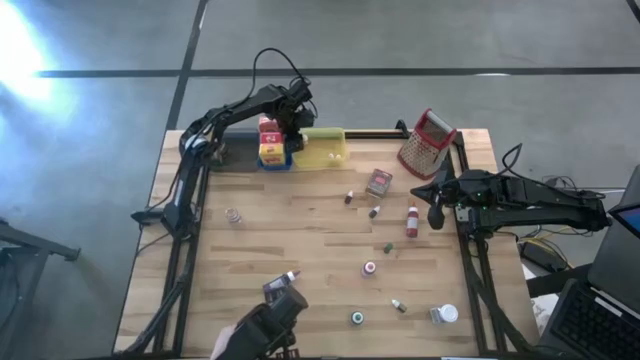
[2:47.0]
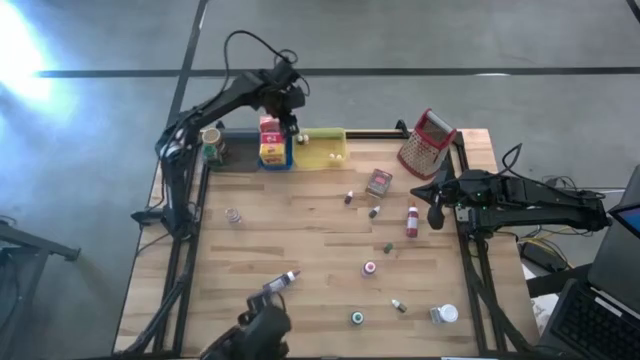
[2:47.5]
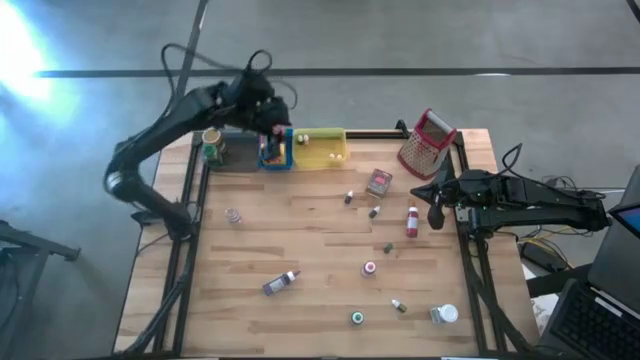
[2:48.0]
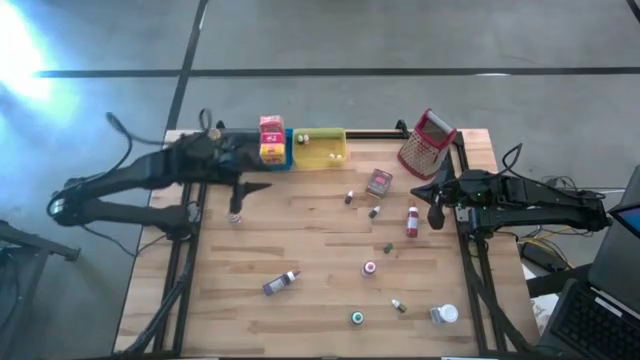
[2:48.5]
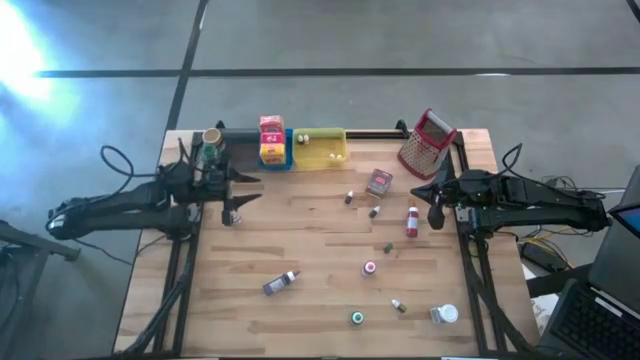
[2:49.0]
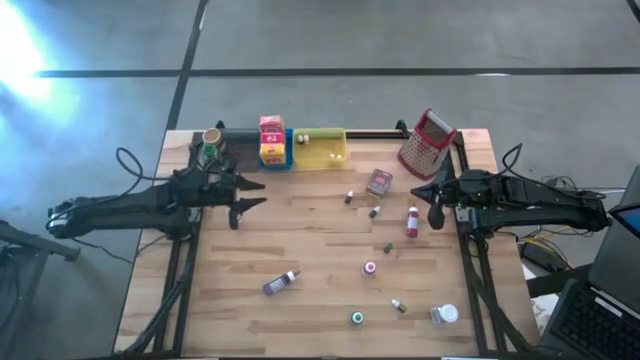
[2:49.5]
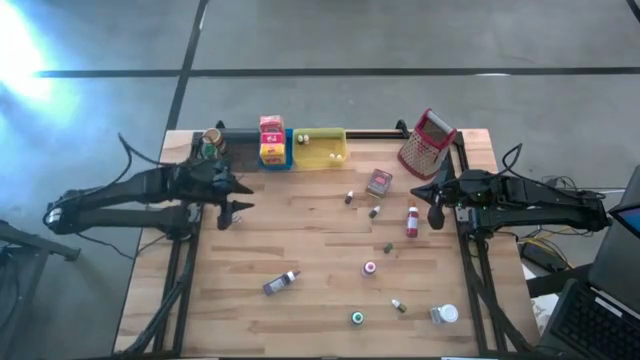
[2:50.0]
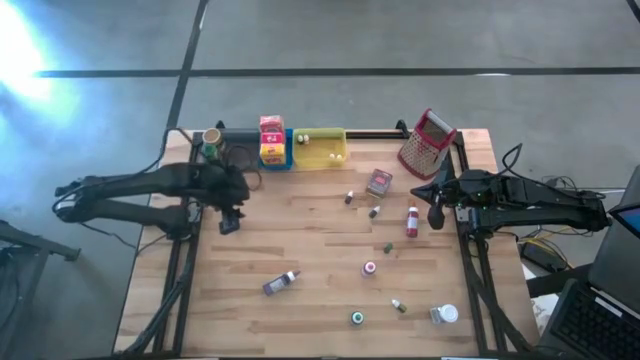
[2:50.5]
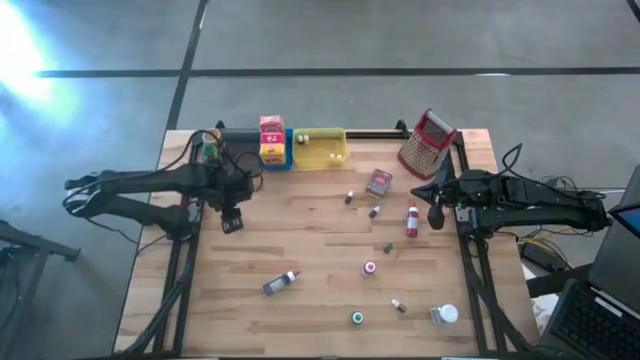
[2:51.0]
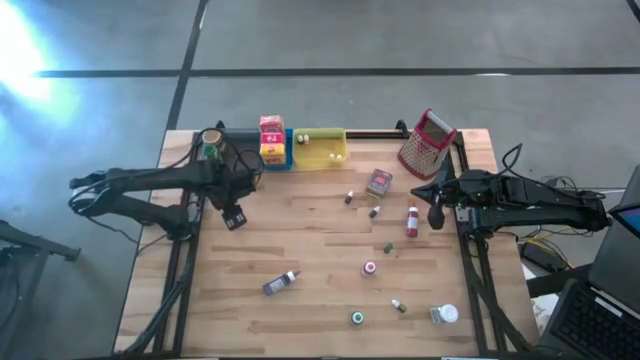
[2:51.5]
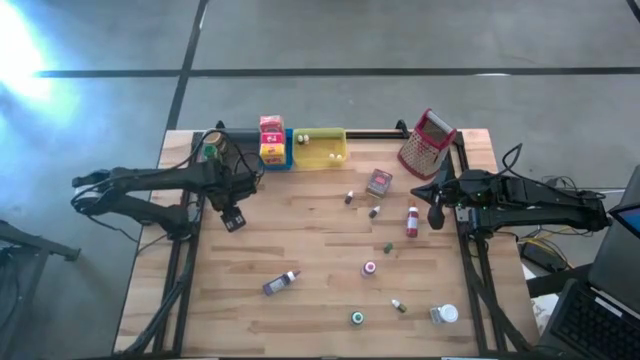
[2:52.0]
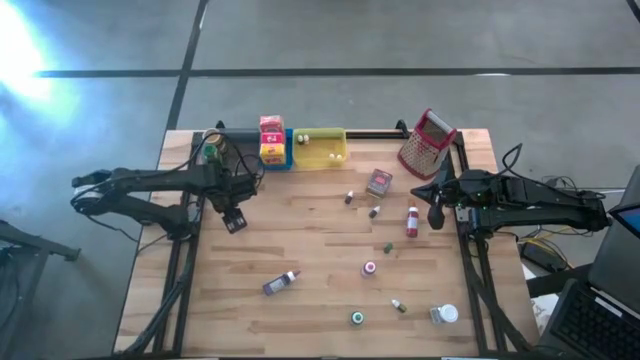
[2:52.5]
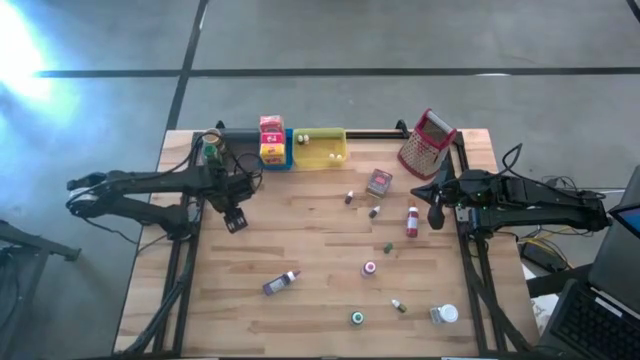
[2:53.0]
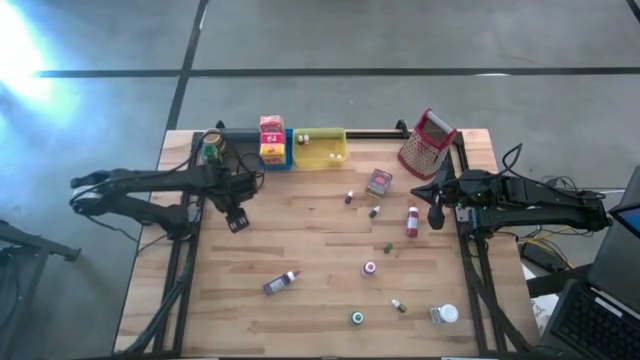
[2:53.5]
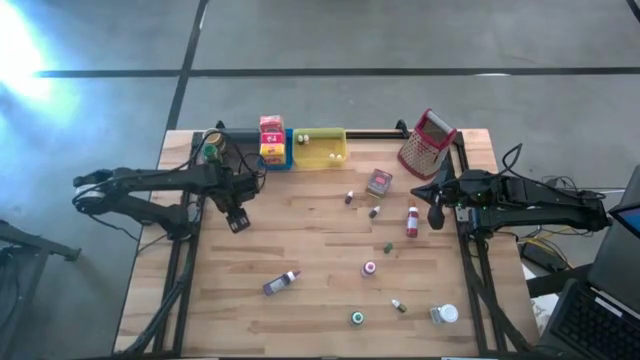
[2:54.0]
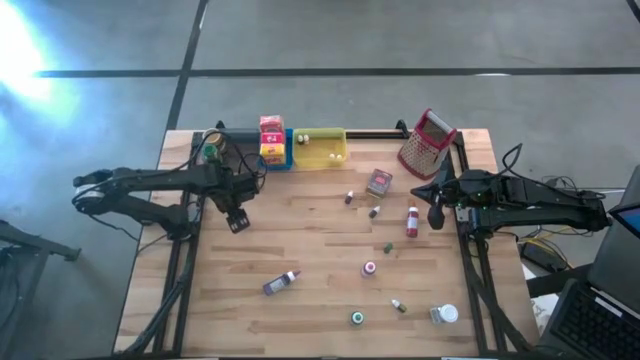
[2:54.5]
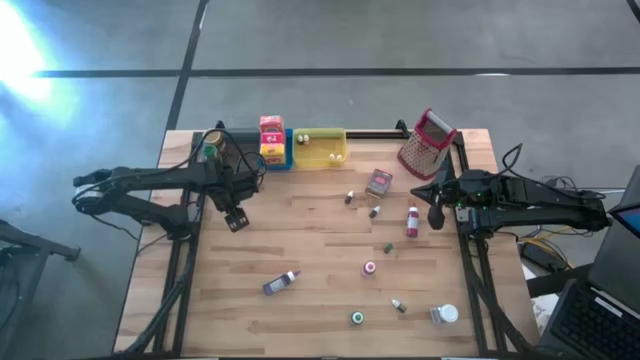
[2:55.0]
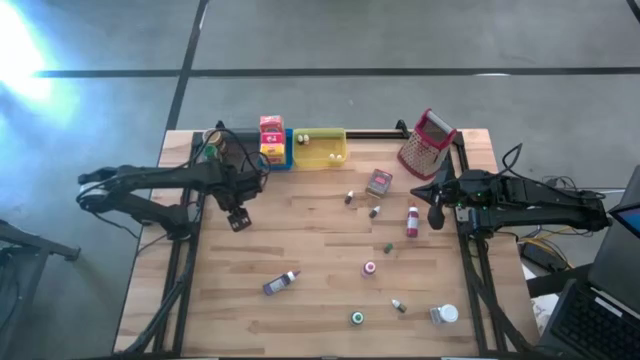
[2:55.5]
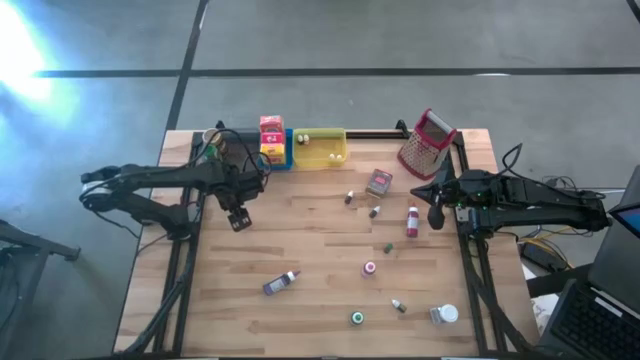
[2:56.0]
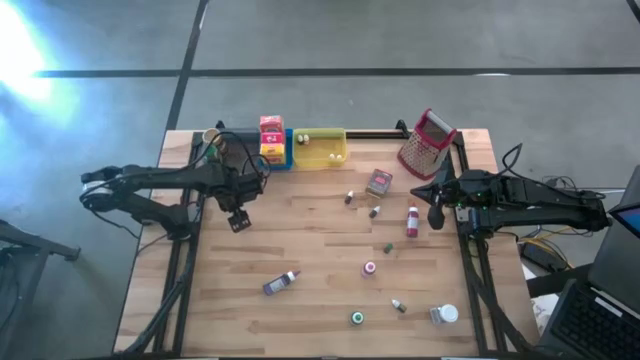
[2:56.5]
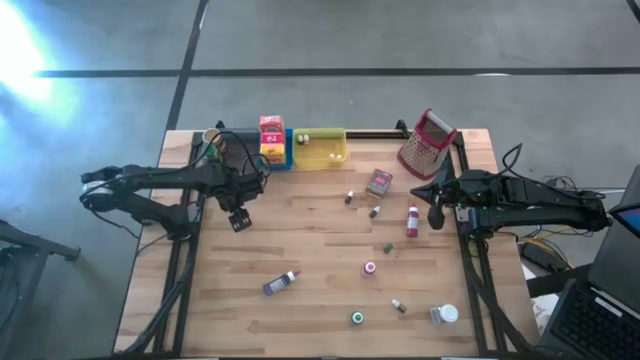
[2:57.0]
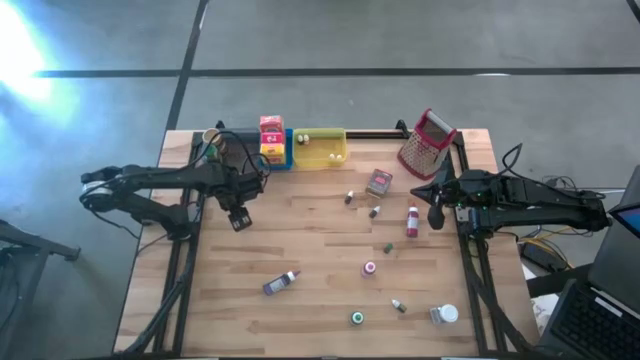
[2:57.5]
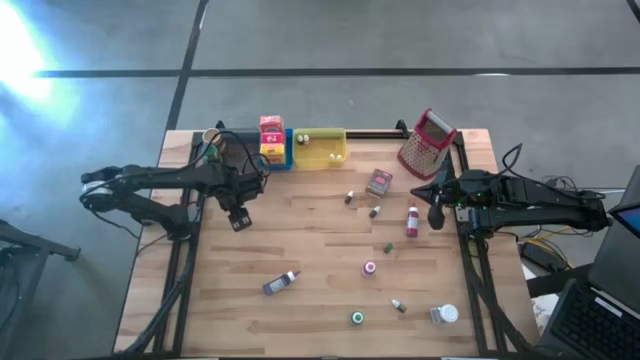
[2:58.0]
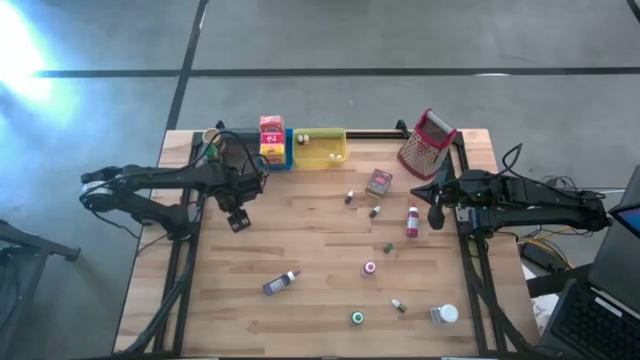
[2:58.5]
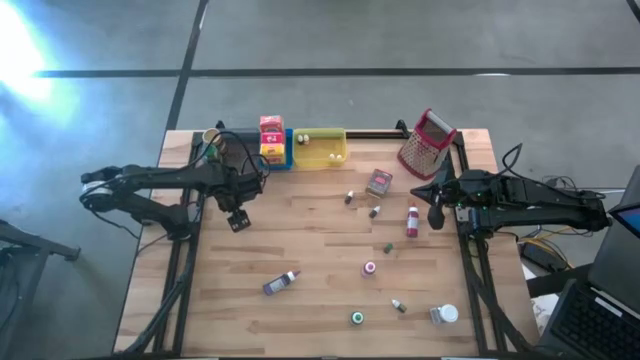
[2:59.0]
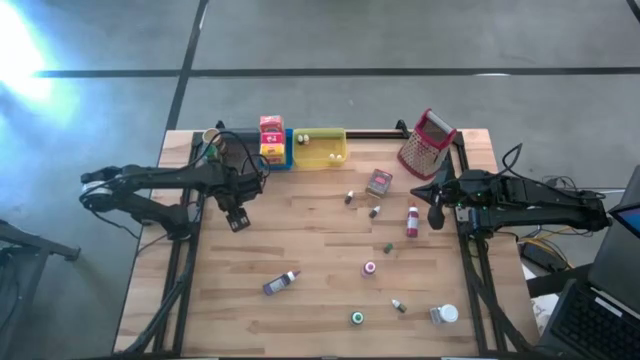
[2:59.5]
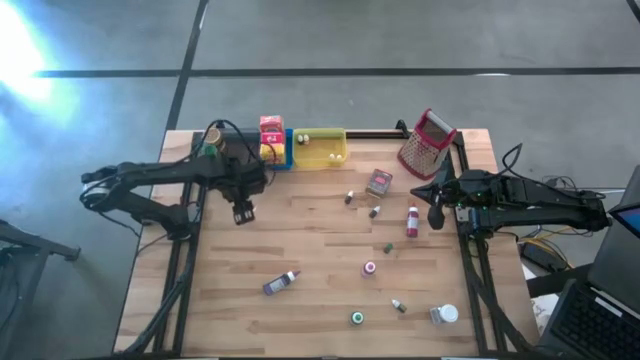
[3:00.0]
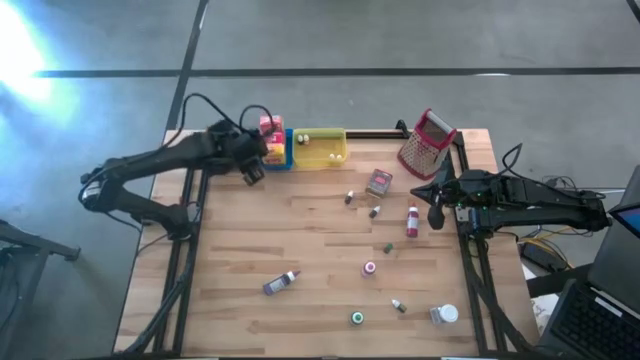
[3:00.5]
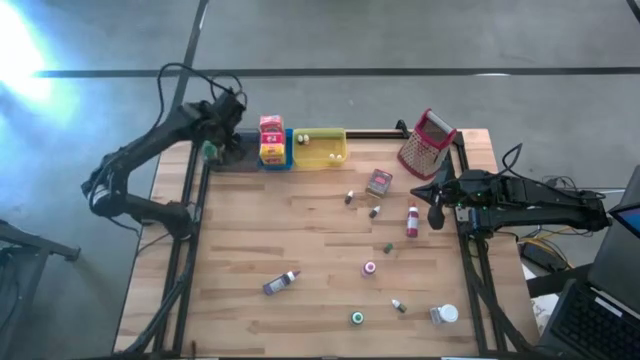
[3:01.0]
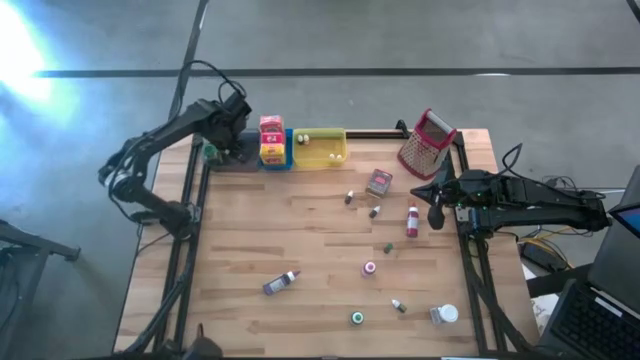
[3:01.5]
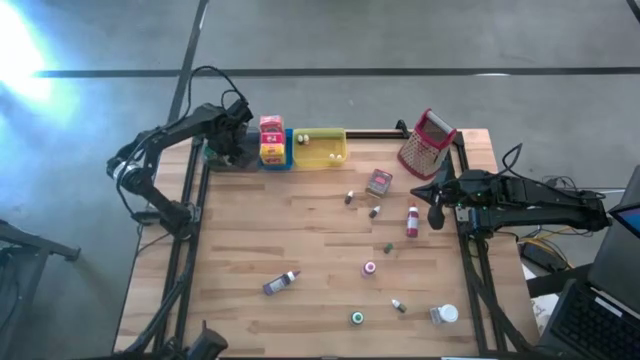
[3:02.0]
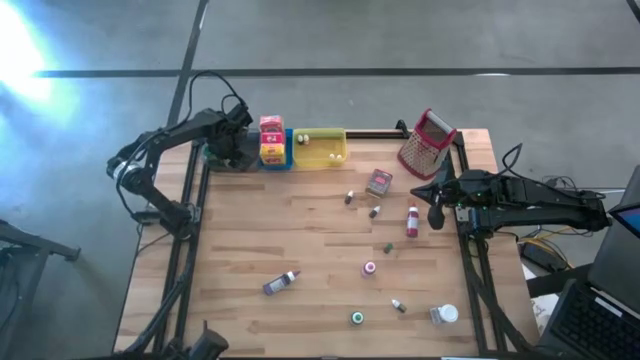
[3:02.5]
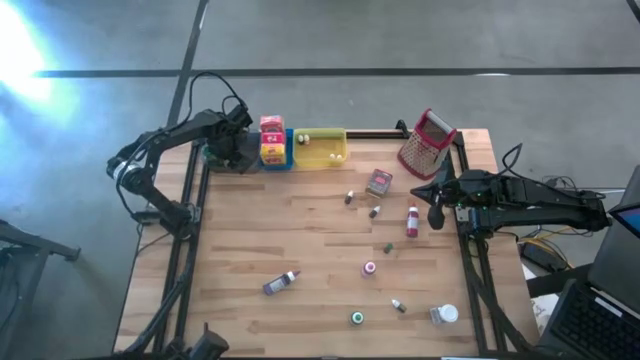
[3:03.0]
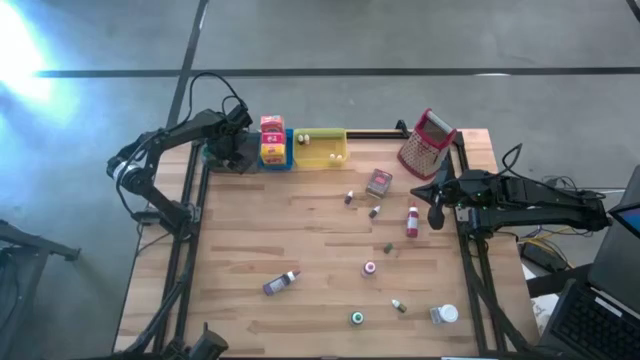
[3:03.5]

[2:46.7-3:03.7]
Task: Pick & Place Kitchen Items
Put the brown seasoning bottle into the black bin

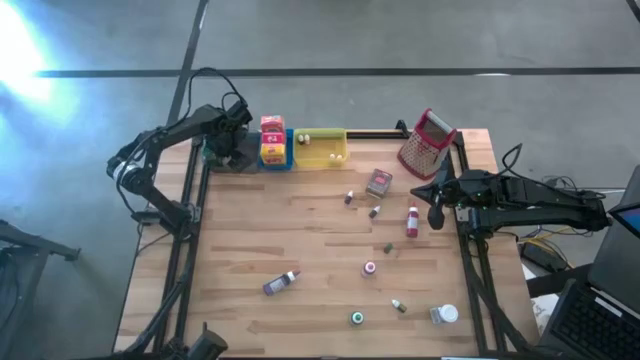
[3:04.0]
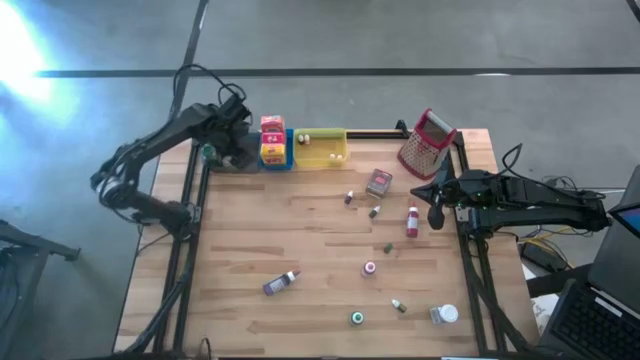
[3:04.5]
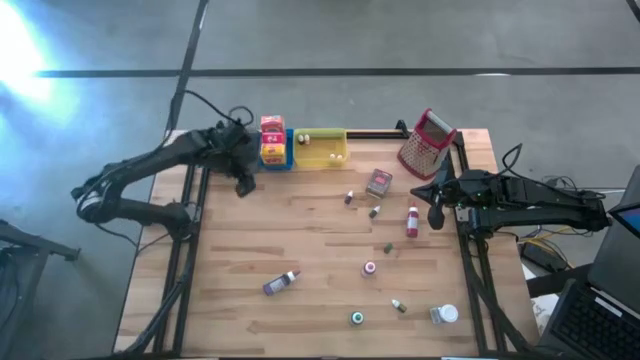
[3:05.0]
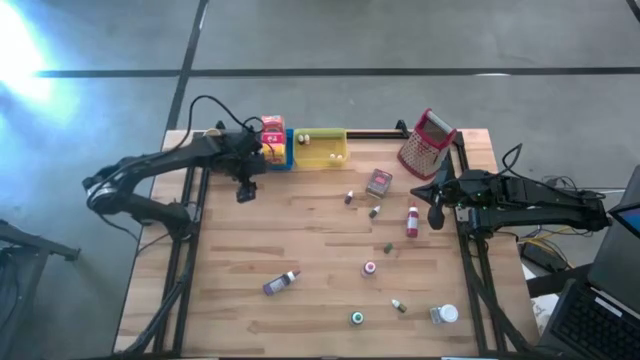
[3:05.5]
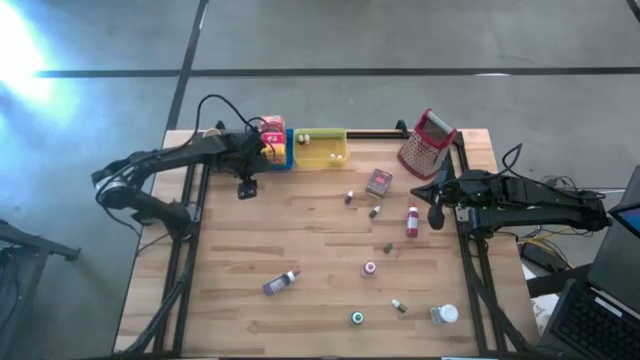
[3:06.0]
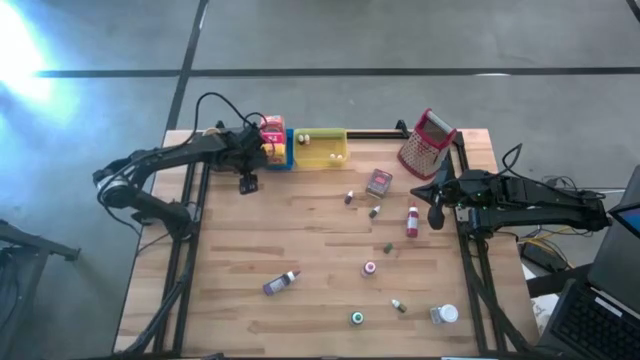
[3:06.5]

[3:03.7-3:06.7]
Adjust the black bin on the table

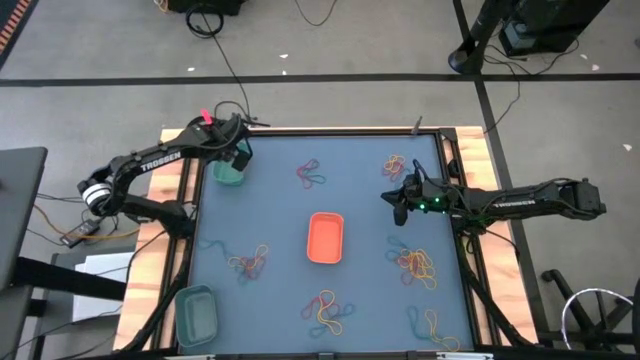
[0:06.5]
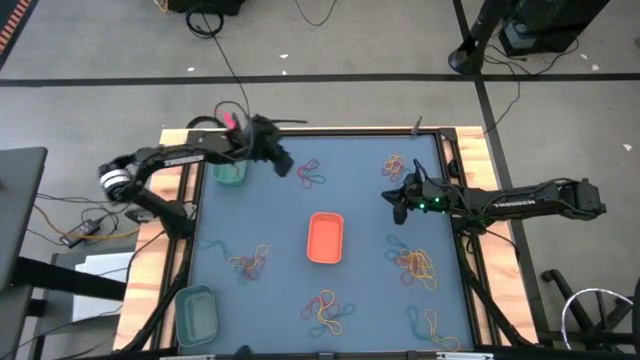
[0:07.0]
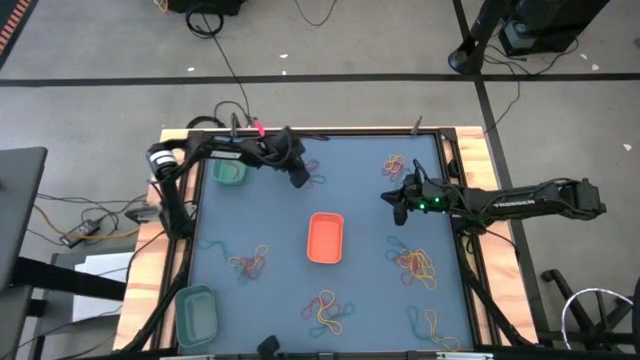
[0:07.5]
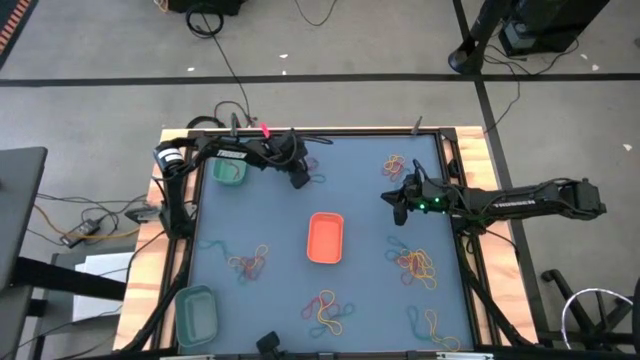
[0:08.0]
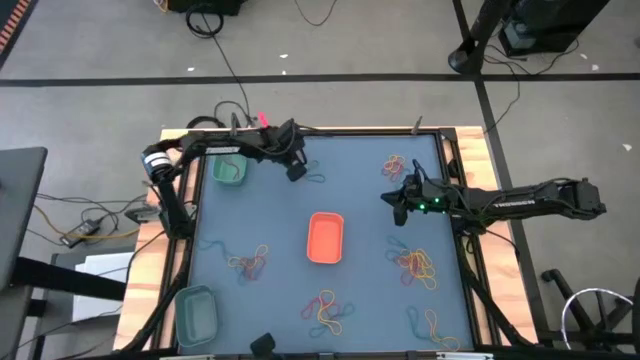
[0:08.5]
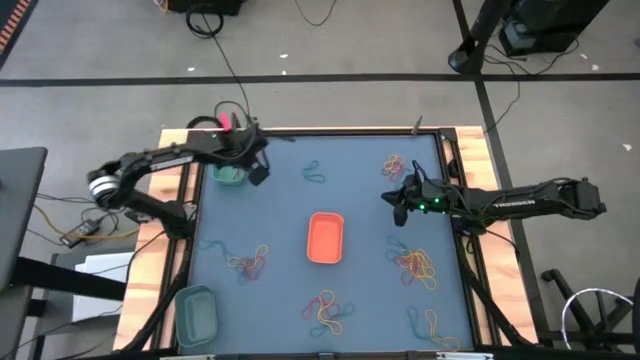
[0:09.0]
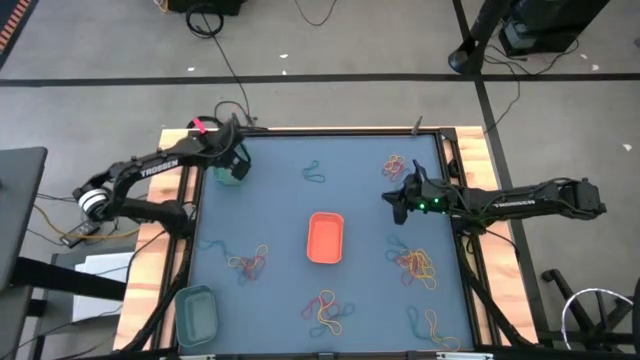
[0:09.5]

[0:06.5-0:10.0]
Task: Sort rubber bands into baskets
Put the red rubber band into the green bin
